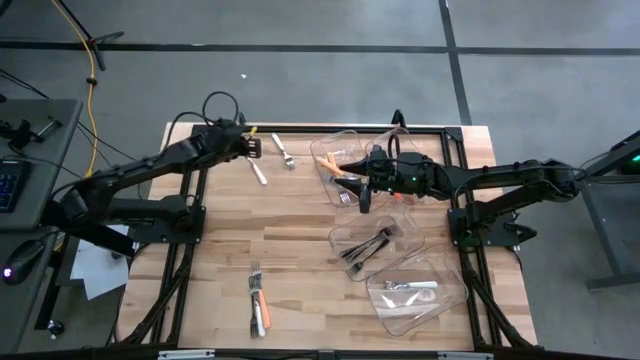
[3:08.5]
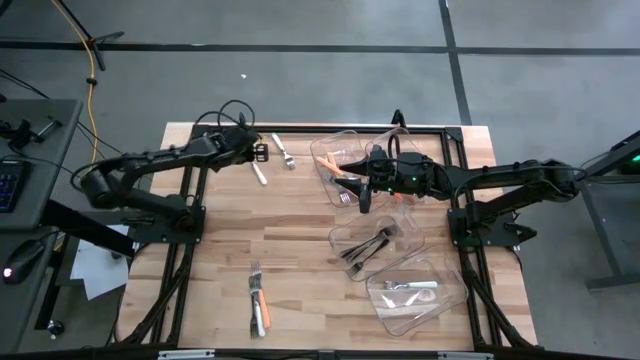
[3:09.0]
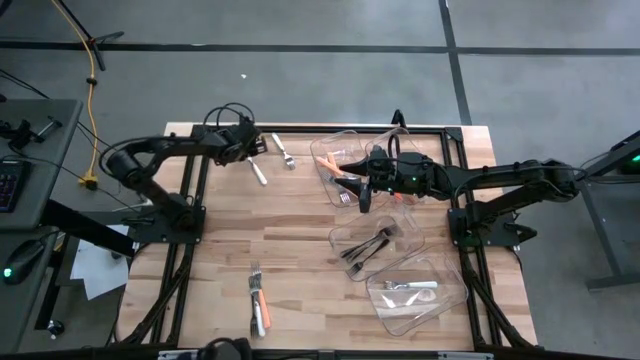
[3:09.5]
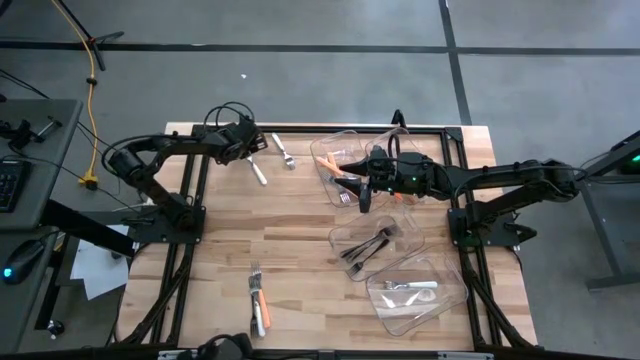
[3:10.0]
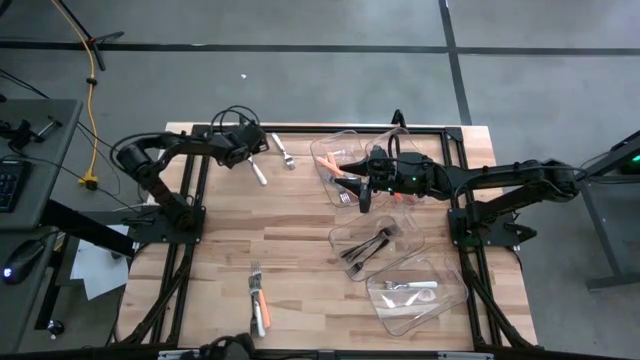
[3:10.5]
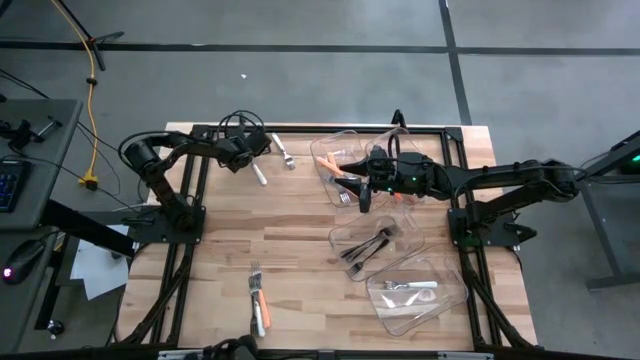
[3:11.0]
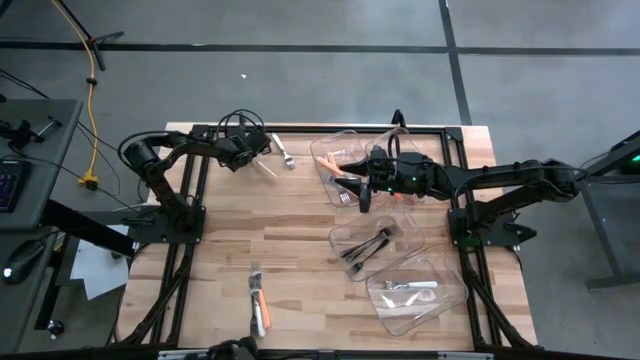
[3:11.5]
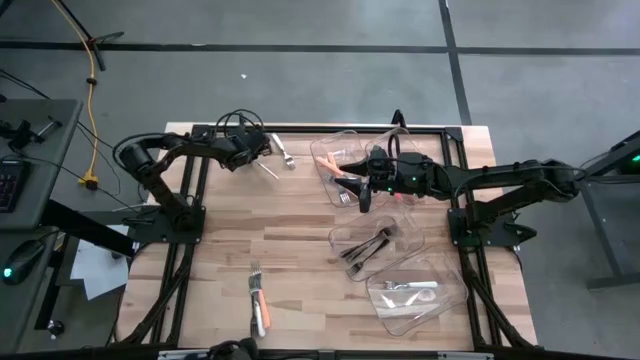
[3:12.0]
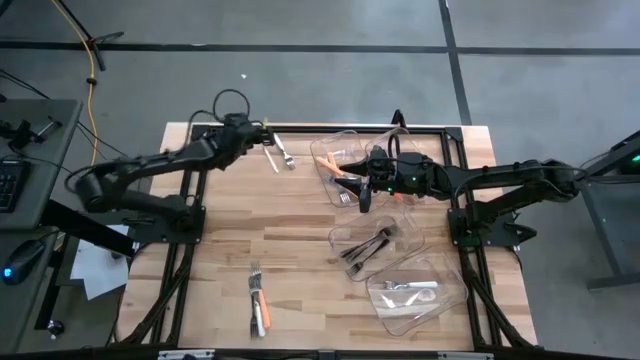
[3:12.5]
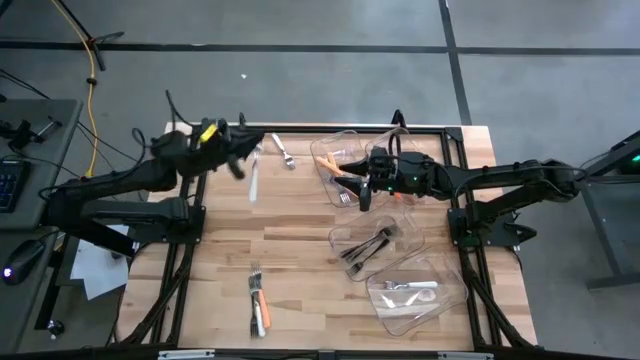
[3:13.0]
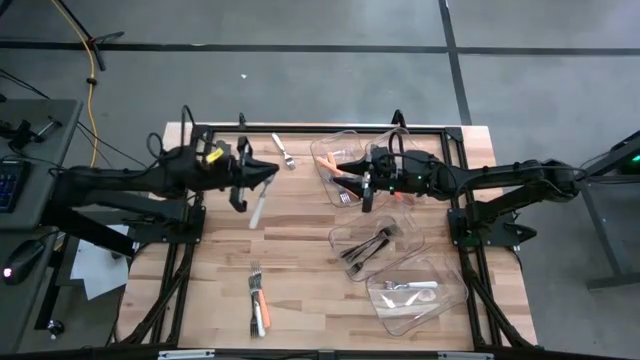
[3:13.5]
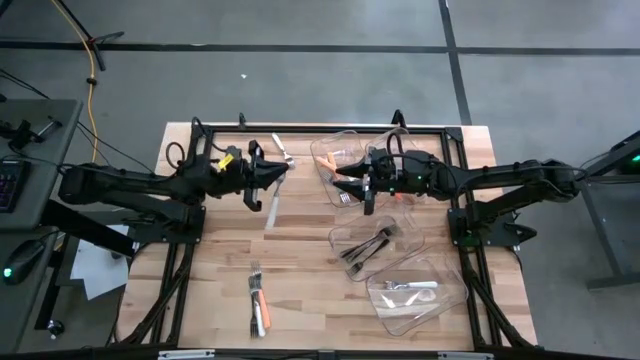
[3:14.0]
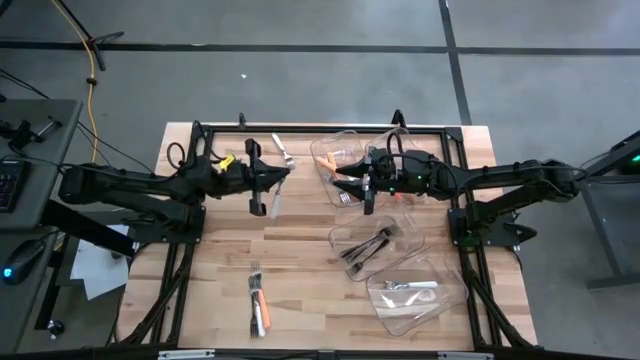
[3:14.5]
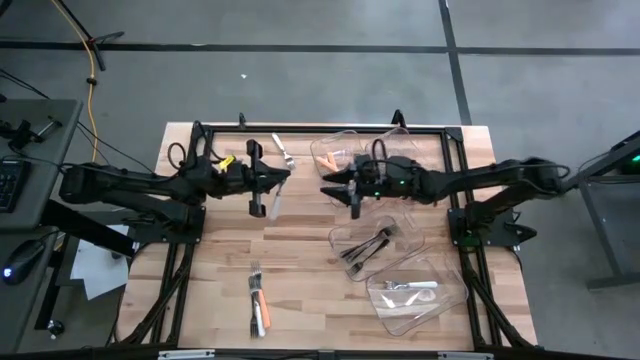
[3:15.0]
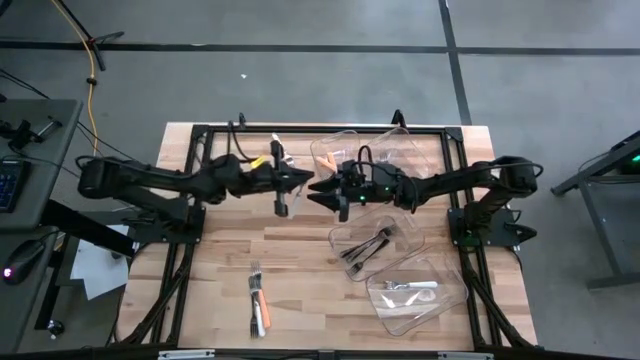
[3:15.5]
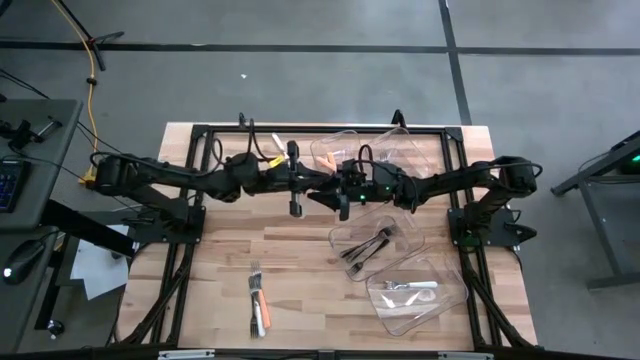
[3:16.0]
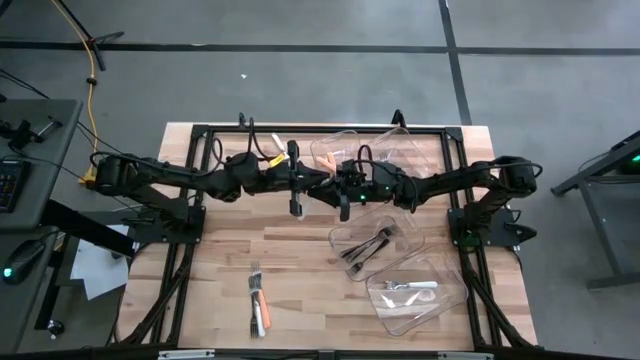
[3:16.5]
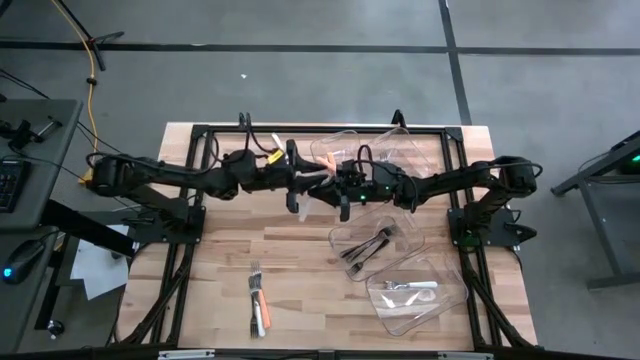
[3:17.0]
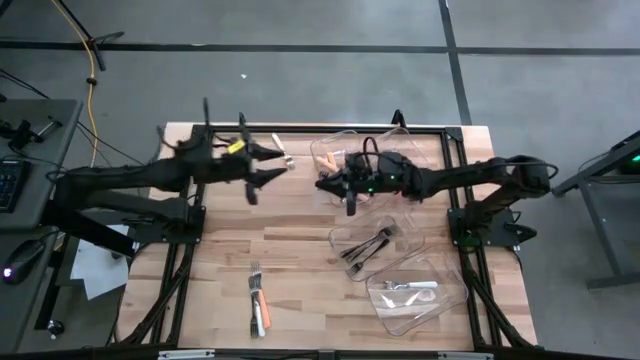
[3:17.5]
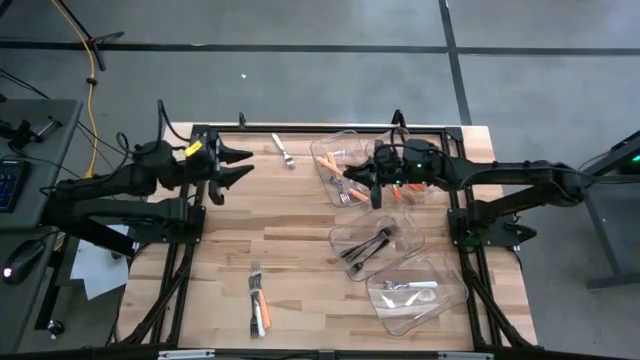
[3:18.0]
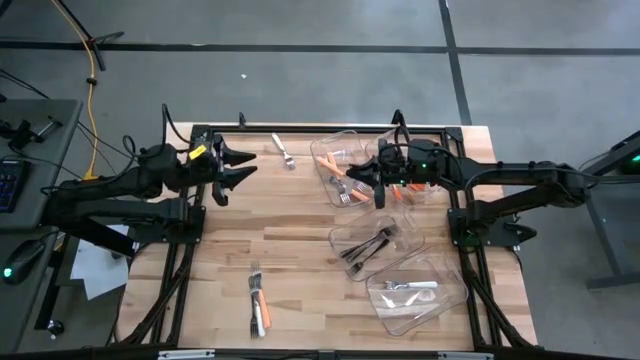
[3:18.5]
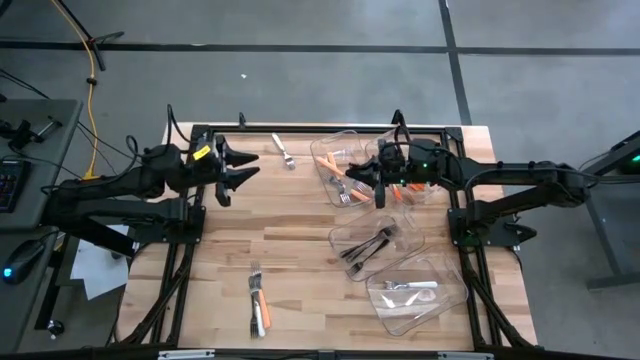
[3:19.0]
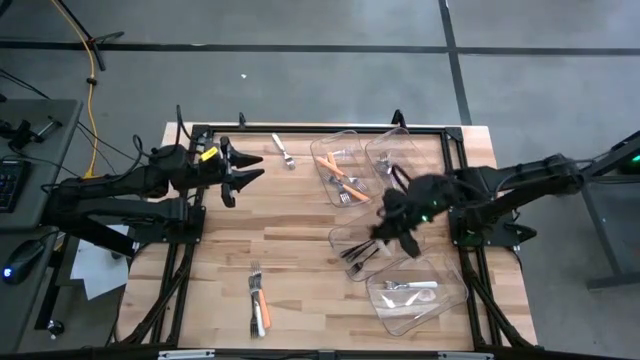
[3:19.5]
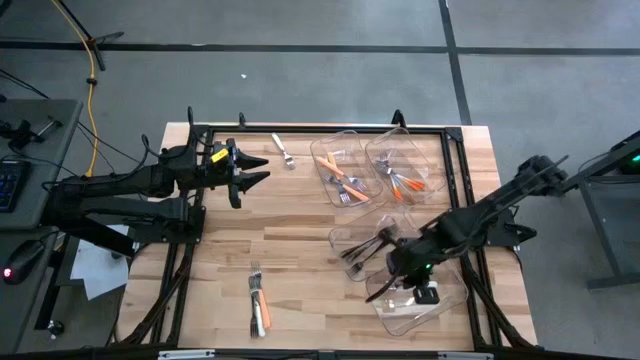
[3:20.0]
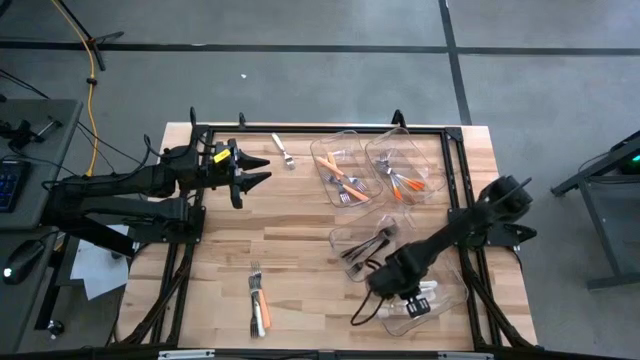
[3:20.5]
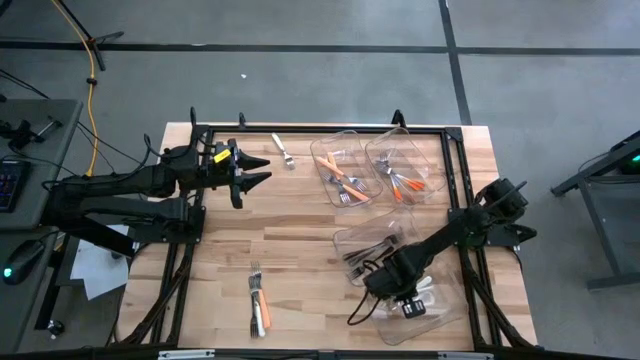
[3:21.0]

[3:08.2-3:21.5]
Task: Sort silverware by color (type)
Put the white fork into the bottom transparent bin

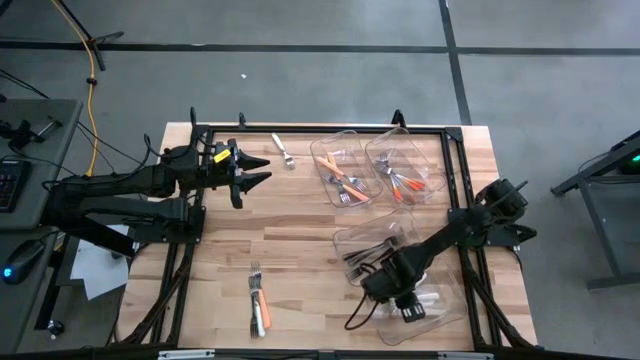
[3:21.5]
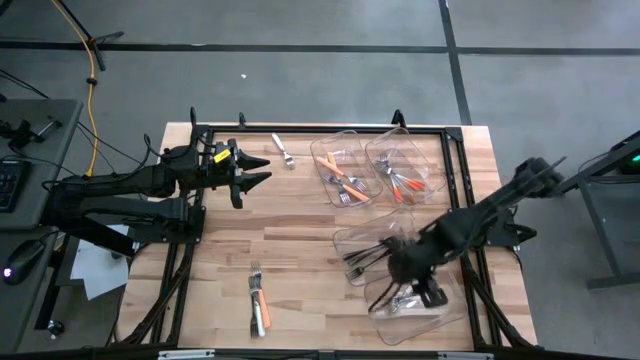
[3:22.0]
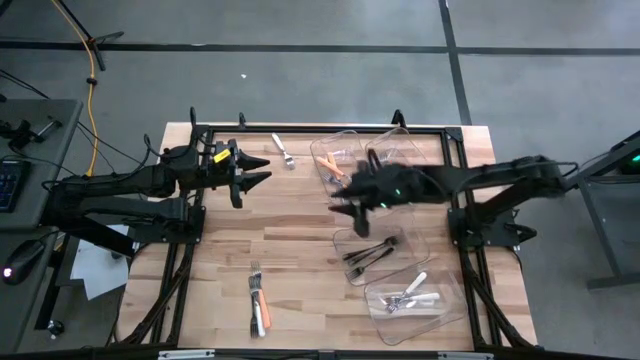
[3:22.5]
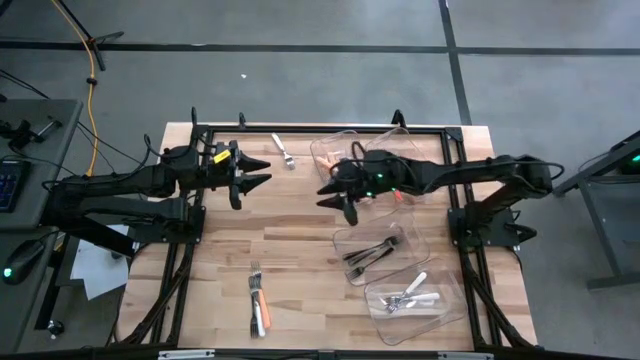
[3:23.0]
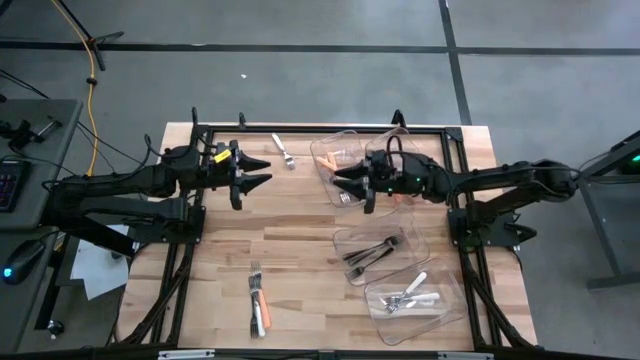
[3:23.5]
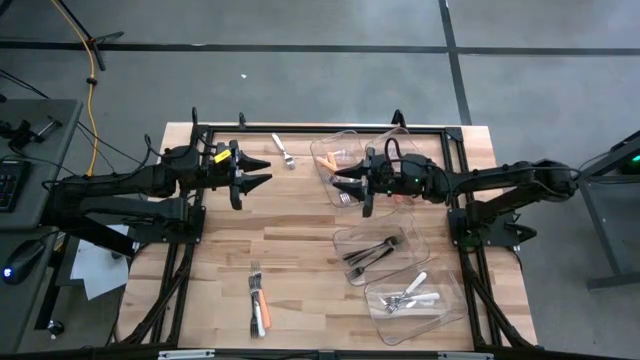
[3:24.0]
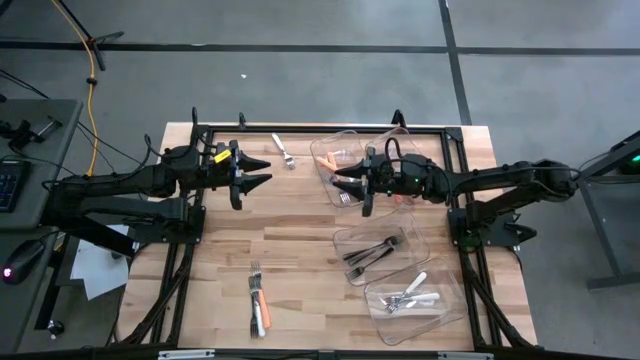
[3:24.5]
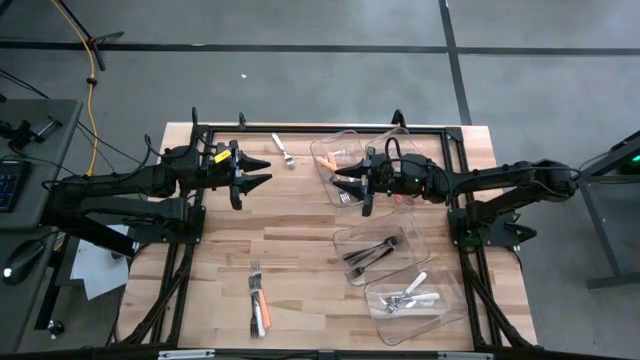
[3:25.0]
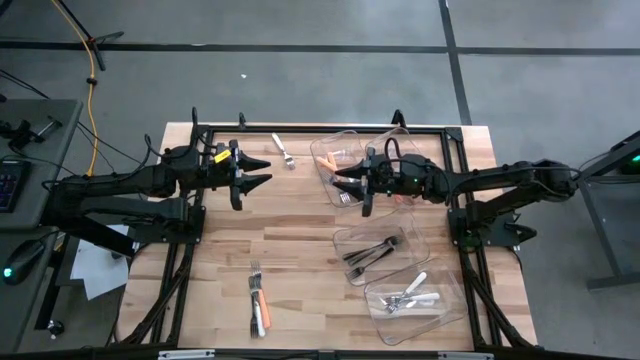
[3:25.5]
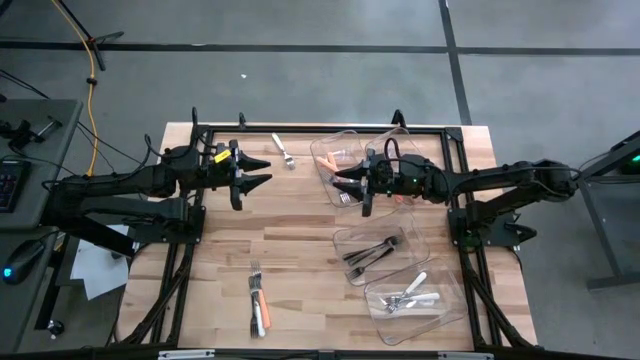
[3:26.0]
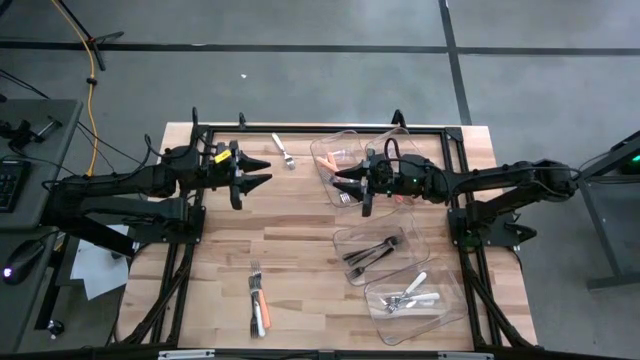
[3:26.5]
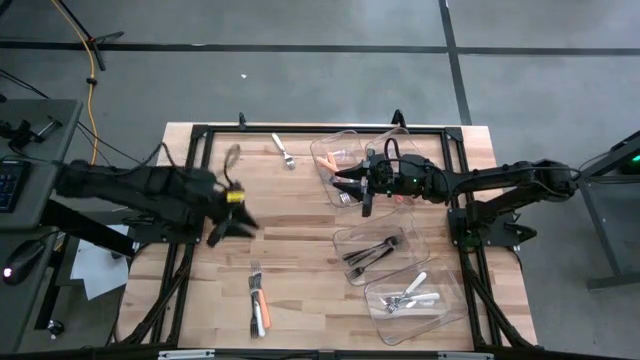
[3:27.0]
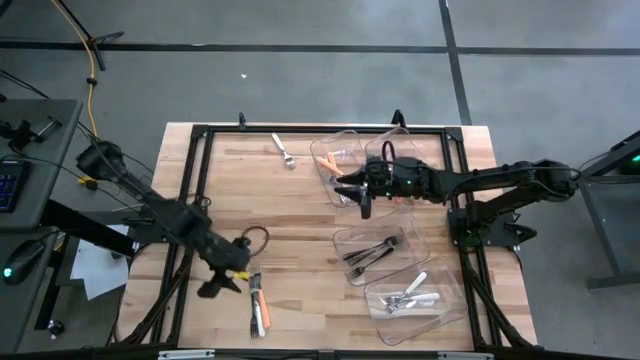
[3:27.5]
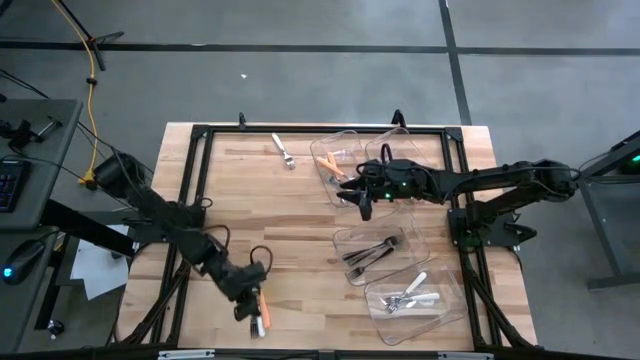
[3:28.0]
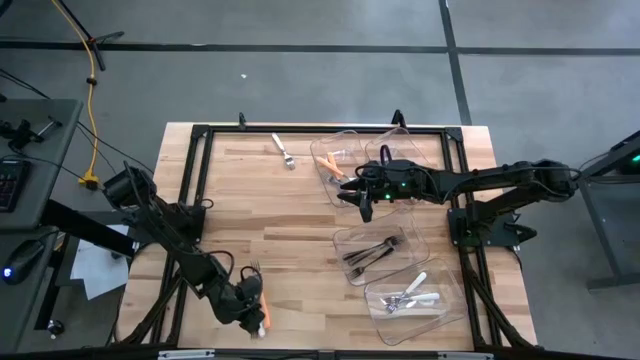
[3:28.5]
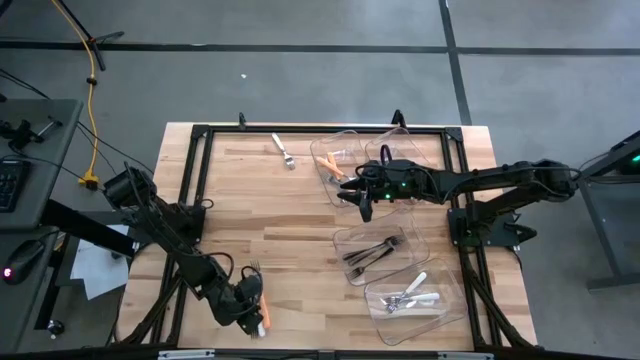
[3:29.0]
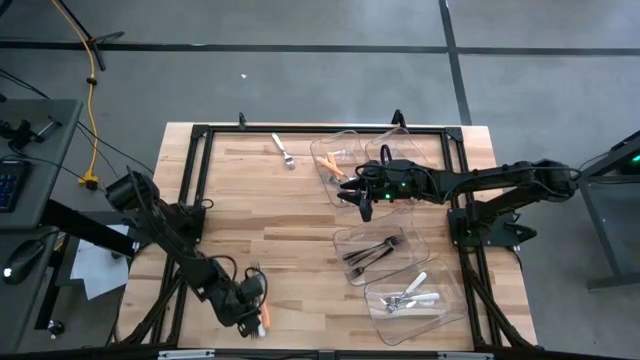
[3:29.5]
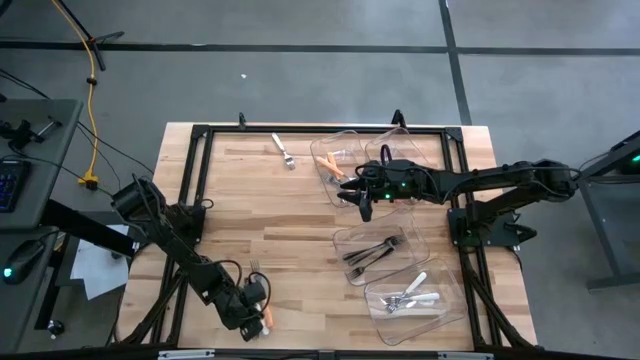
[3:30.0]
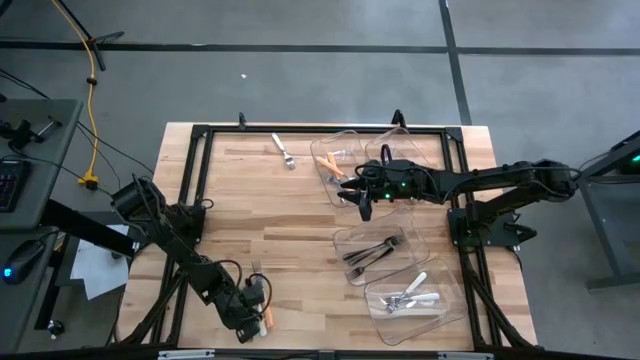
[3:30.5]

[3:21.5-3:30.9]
Move the black fork from the top
